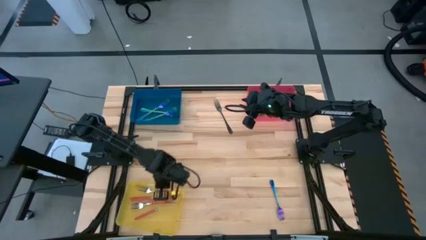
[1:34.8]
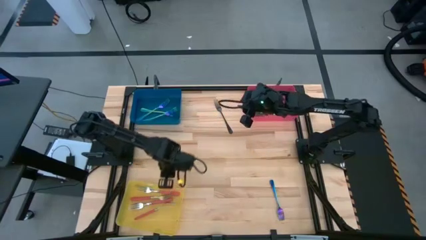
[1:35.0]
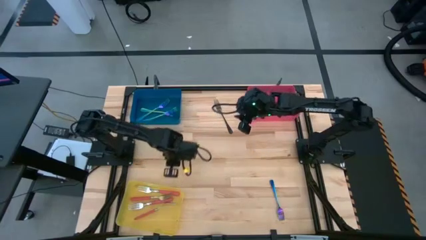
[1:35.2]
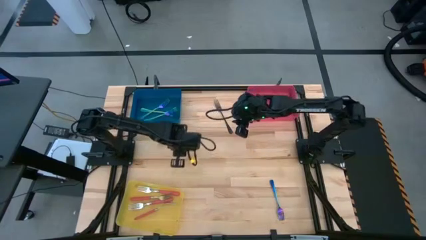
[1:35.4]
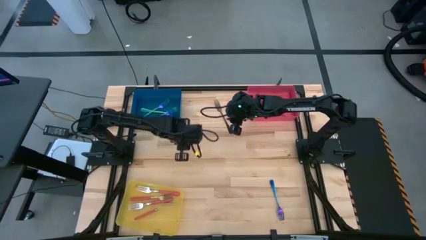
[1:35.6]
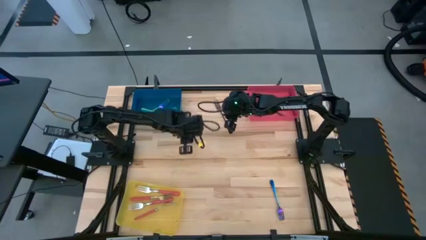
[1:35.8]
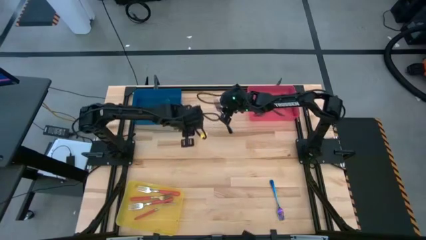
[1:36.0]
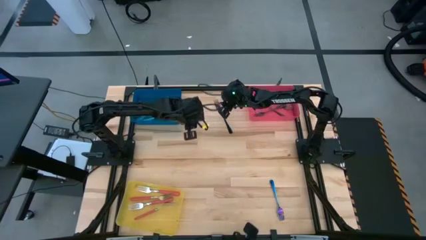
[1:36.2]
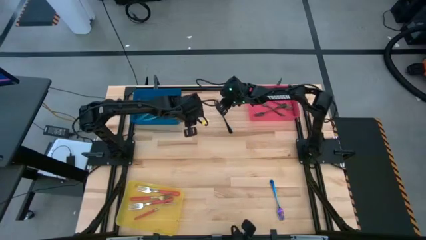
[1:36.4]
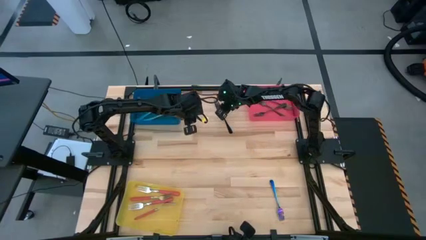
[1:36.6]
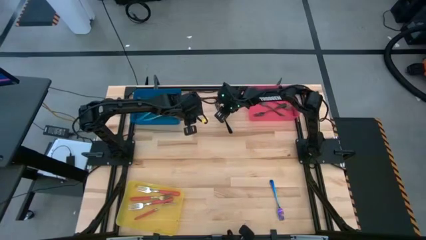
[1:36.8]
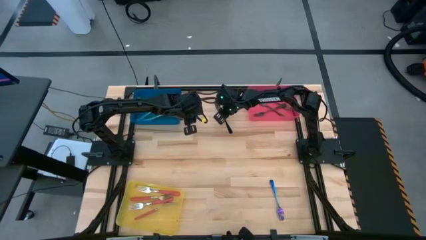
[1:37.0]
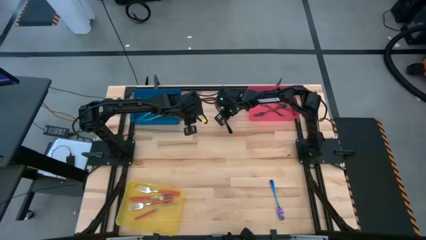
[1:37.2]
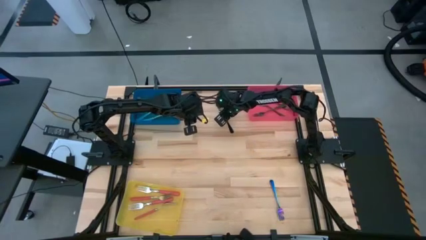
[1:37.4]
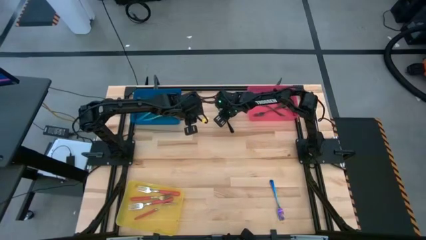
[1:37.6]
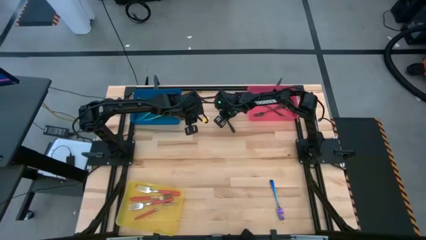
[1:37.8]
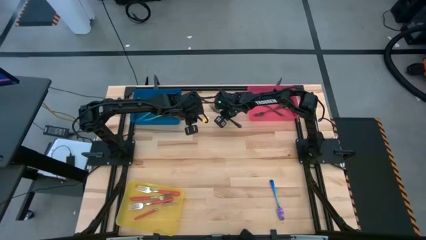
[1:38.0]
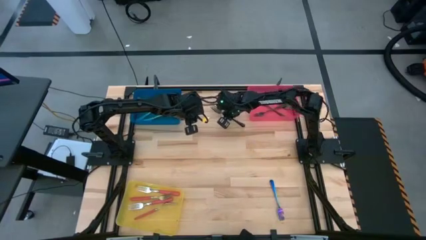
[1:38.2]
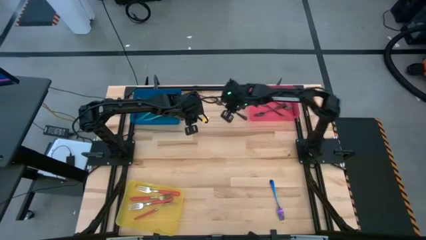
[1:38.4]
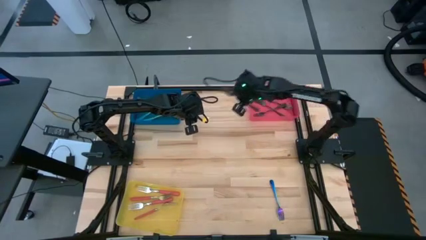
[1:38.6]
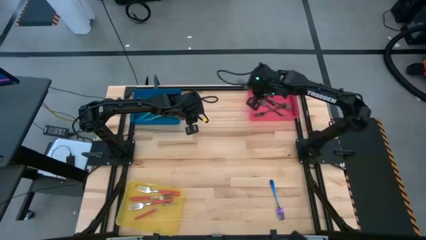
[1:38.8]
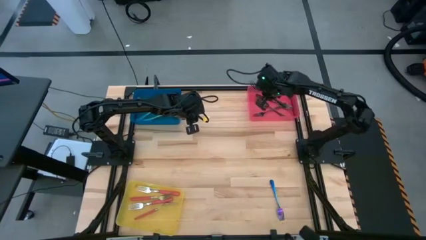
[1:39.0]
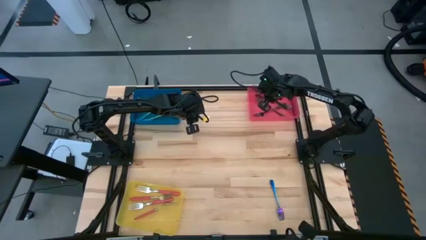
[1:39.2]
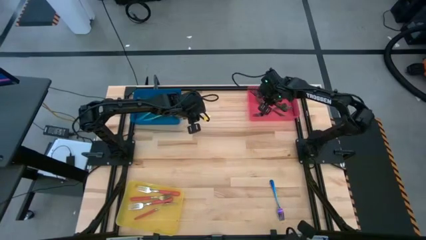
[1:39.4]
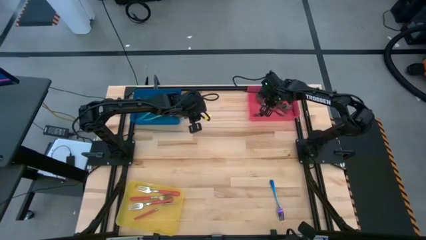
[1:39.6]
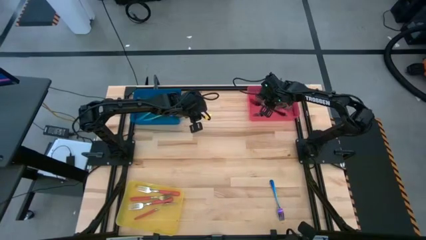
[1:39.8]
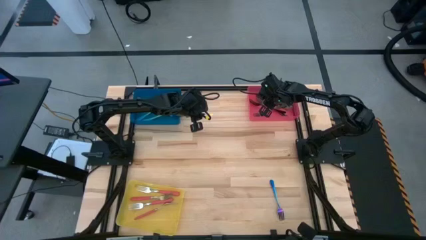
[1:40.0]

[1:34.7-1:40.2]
Task: Sort silverware by color (type)
Put the black fork into the red bin

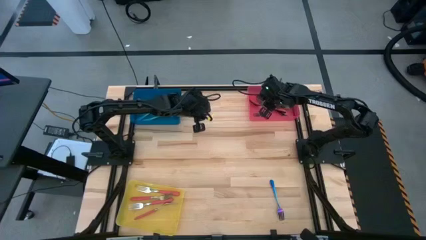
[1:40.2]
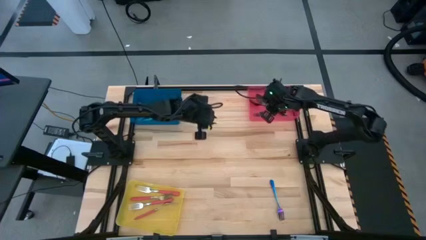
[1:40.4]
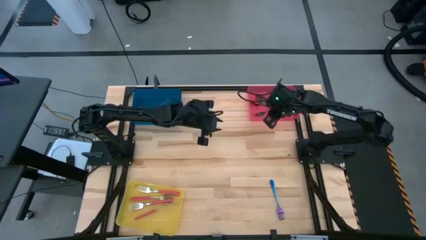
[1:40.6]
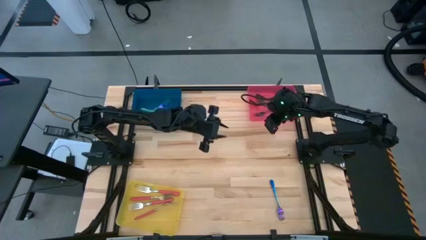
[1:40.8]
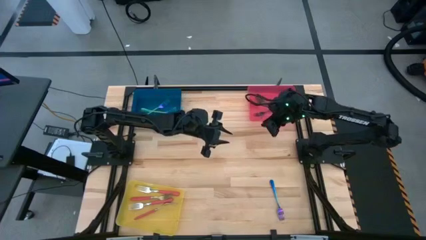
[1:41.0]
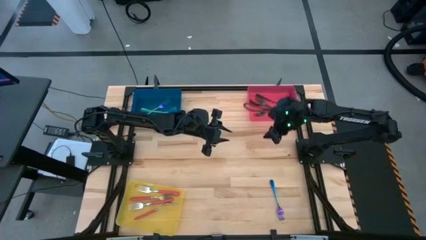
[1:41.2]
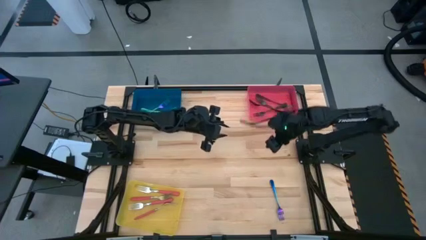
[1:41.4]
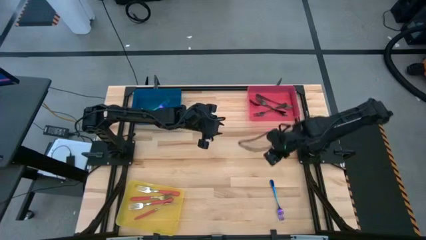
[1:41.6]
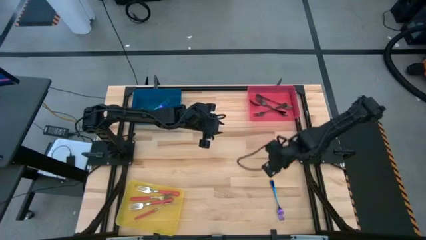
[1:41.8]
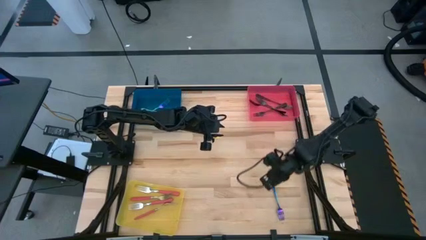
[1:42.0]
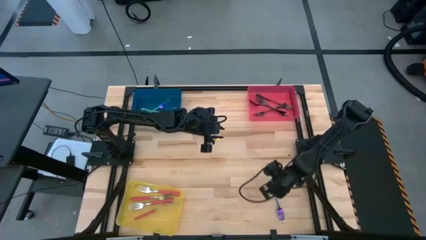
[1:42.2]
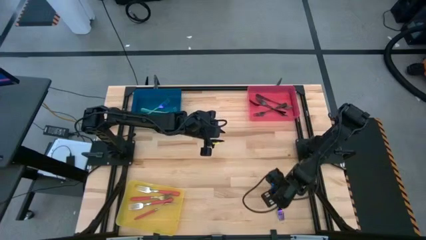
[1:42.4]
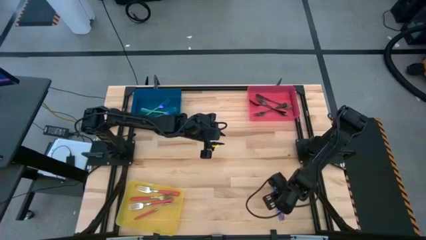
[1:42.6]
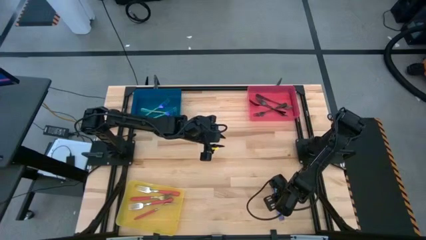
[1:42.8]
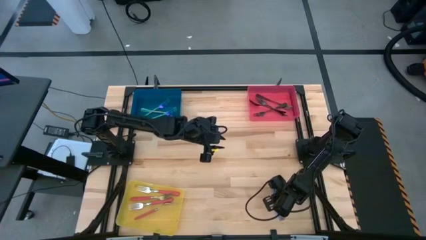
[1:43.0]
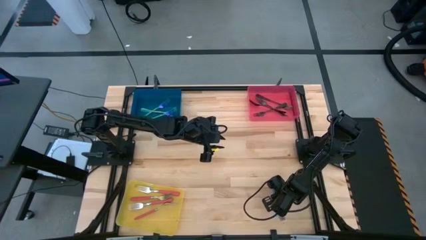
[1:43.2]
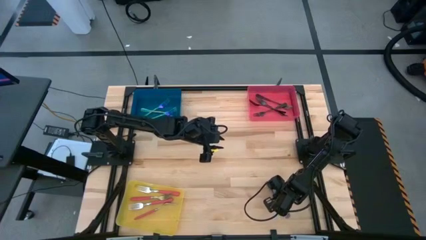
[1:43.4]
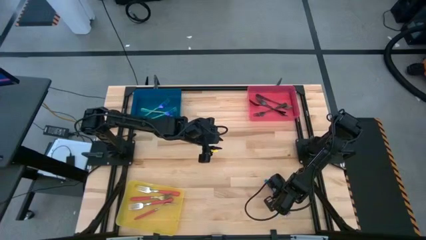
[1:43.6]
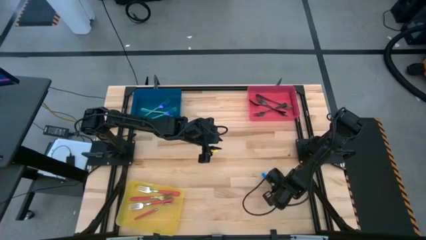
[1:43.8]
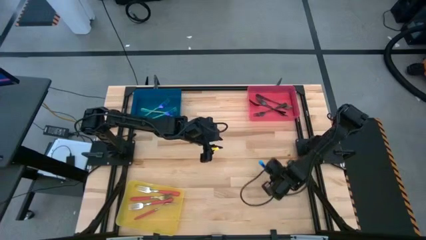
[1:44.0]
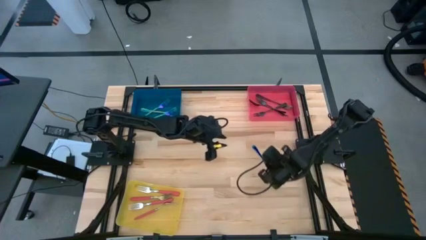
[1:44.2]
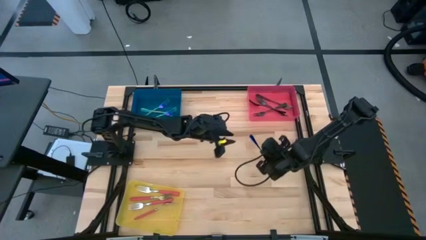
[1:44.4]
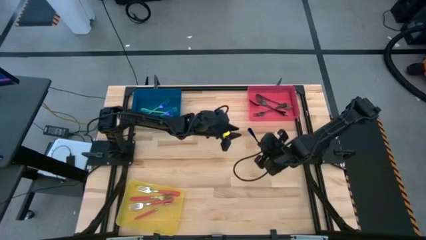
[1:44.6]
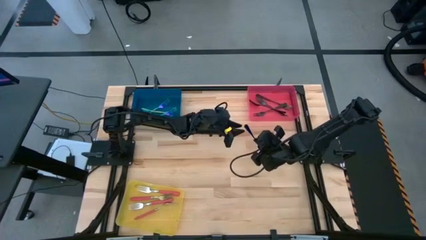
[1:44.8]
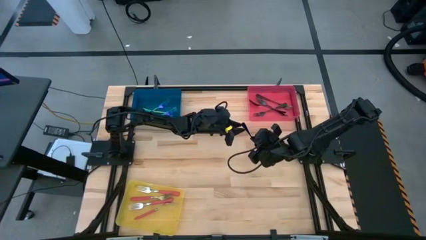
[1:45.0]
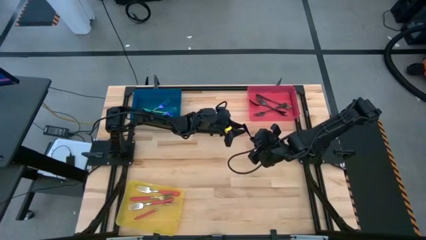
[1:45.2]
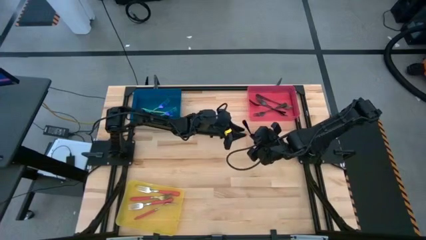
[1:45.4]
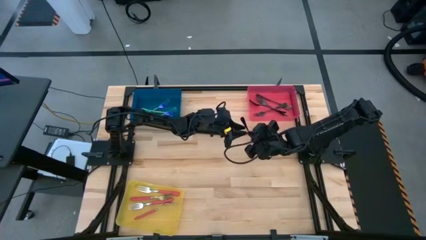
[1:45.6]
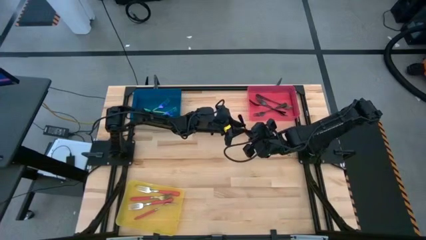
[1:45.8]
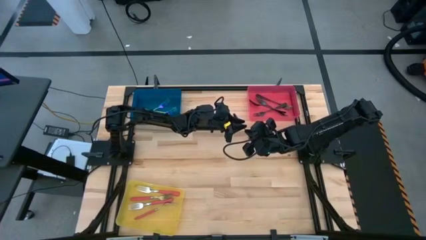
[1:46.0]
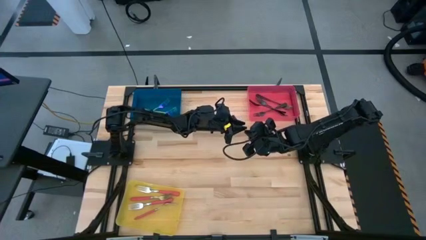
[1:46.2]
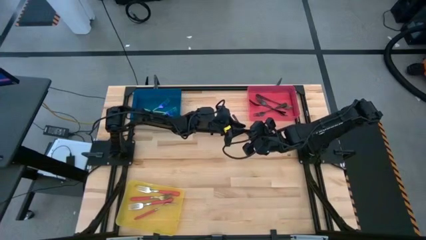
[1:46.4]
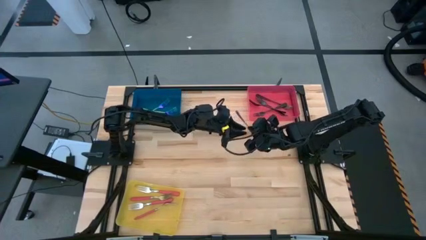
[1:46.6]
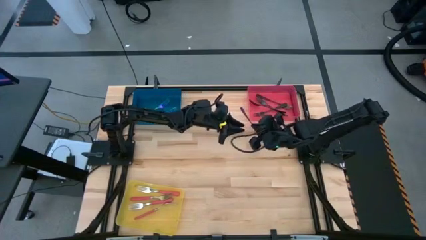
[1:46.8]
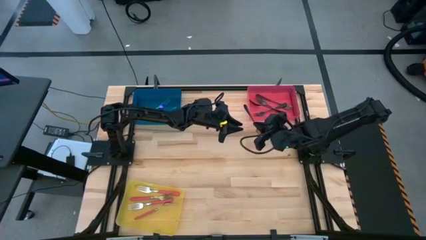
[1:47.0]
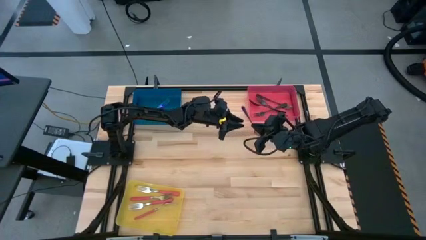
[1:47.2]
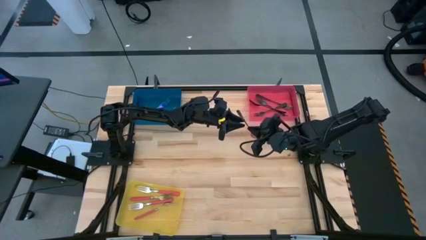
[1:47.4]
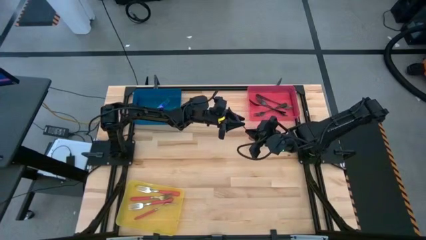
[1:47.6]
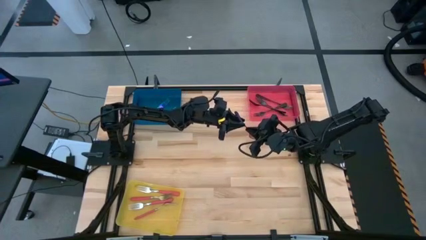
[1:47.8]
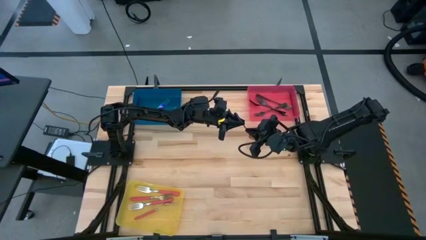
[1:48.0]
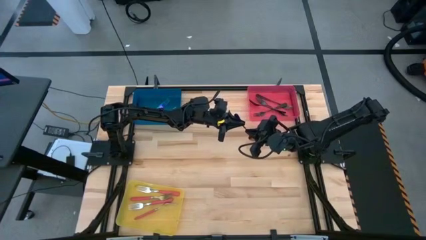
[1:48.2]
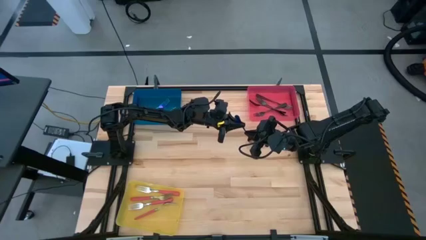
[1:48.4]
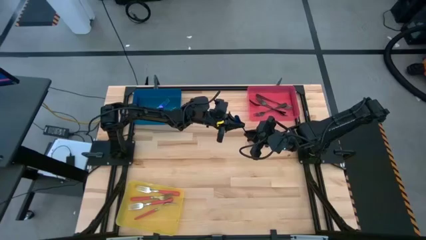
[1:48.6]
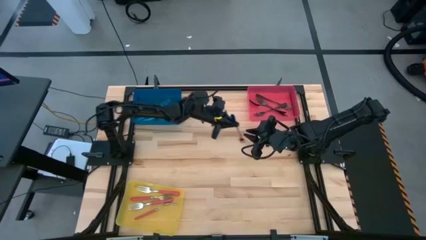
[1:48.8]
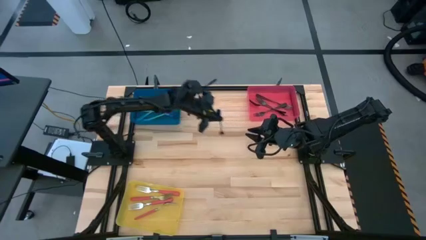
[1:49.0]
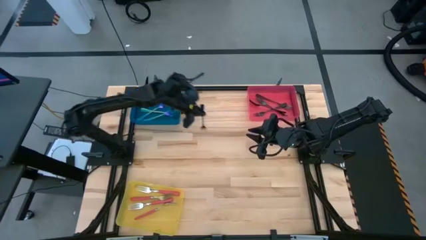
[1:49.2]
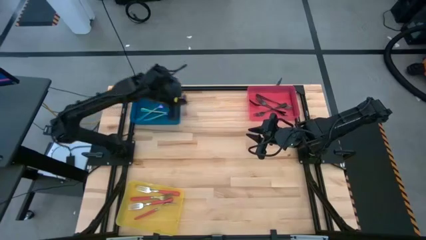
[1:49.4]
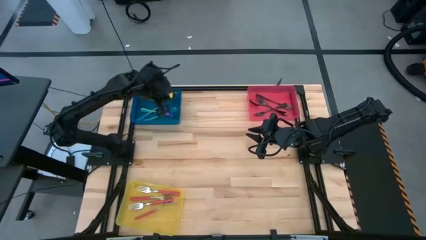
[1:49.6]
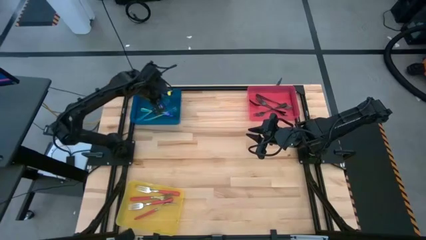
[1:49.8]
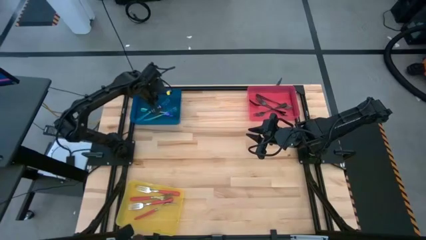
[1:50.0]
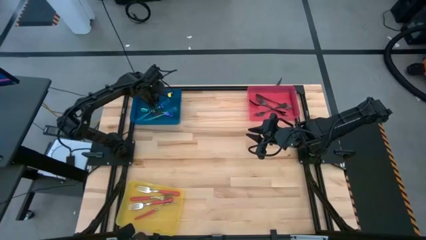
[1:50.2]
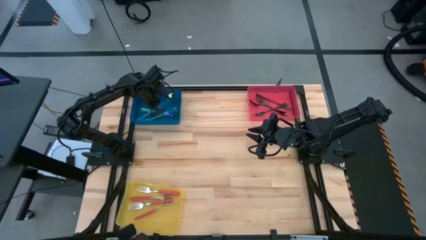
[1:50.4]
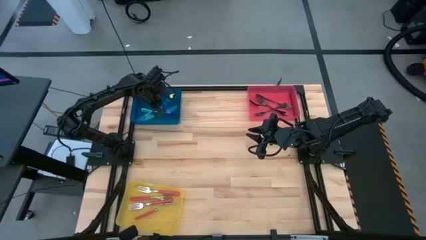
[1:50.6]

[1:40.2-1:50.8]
Put the iridescent fork into the blue bin
